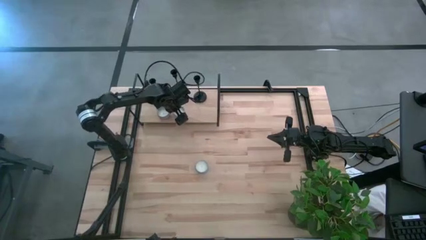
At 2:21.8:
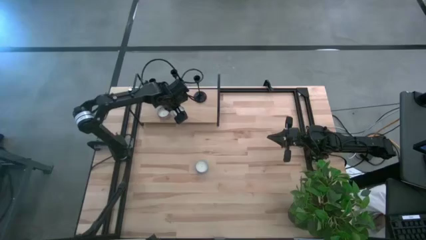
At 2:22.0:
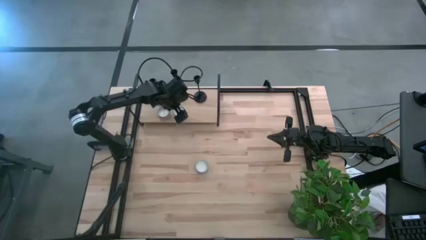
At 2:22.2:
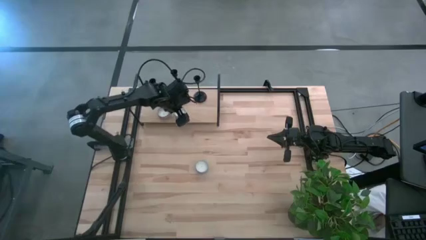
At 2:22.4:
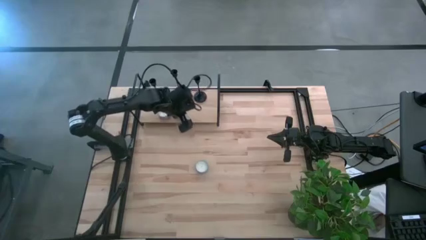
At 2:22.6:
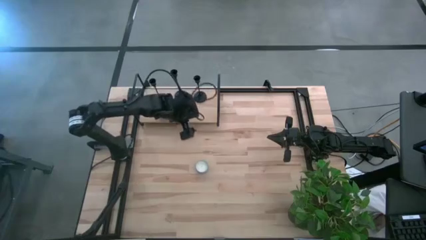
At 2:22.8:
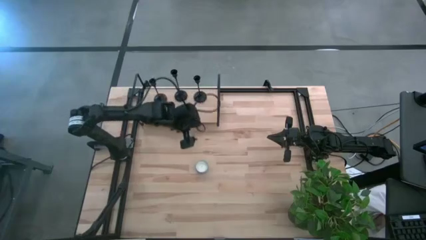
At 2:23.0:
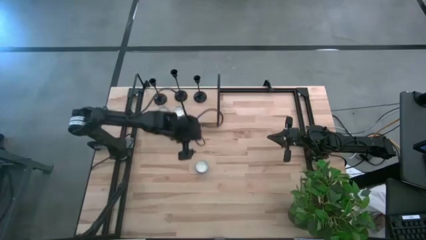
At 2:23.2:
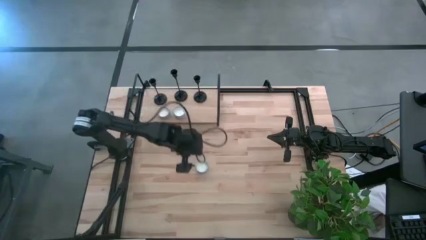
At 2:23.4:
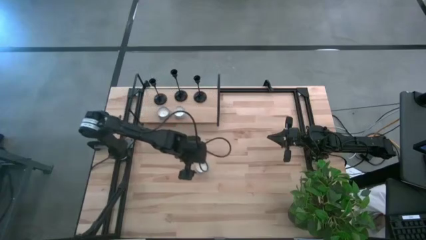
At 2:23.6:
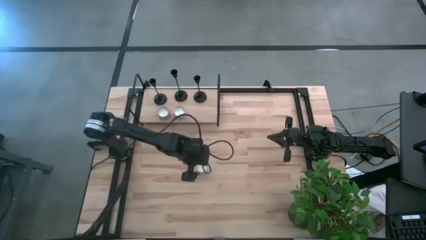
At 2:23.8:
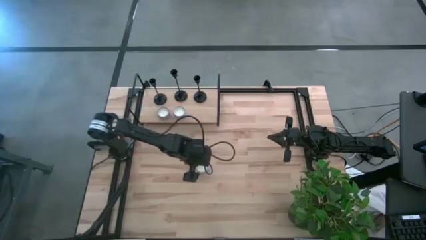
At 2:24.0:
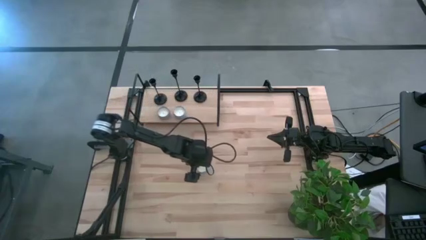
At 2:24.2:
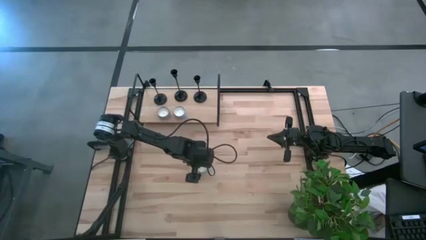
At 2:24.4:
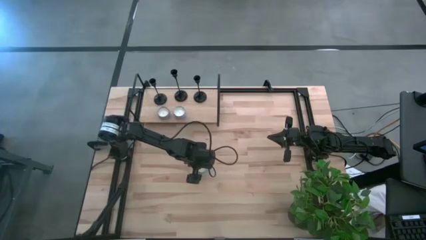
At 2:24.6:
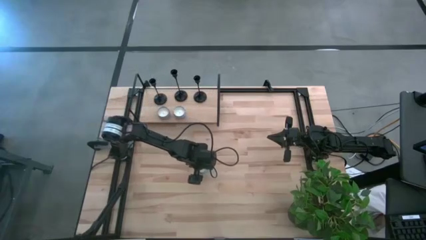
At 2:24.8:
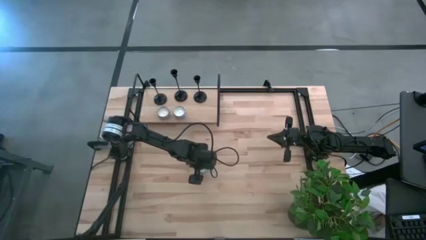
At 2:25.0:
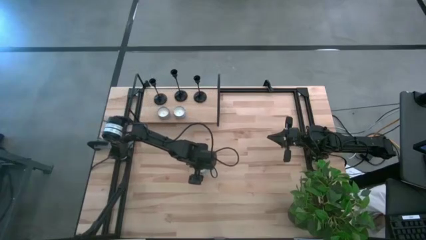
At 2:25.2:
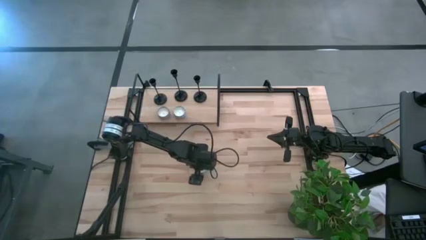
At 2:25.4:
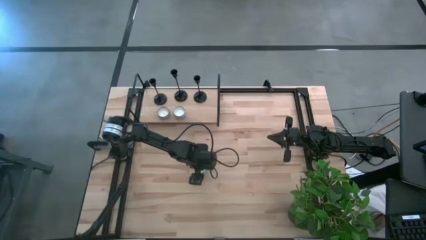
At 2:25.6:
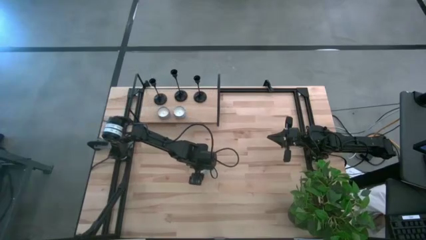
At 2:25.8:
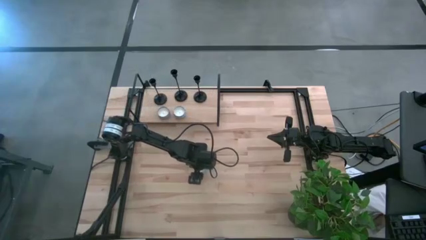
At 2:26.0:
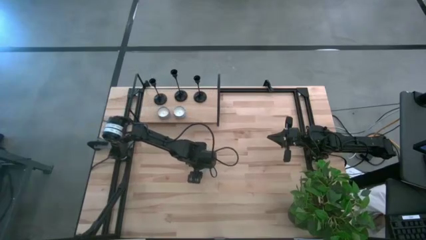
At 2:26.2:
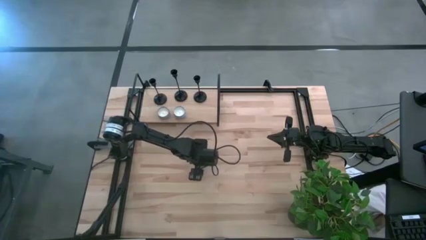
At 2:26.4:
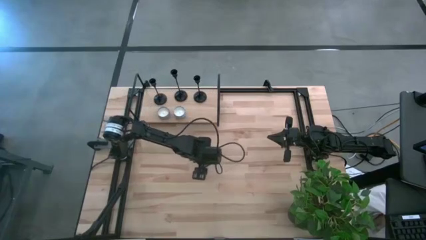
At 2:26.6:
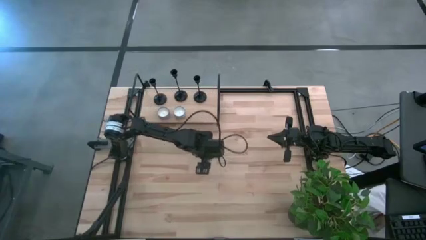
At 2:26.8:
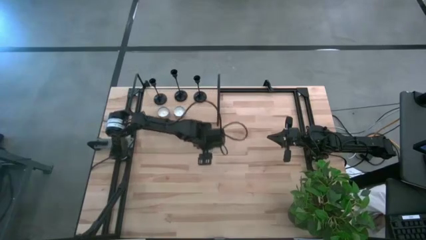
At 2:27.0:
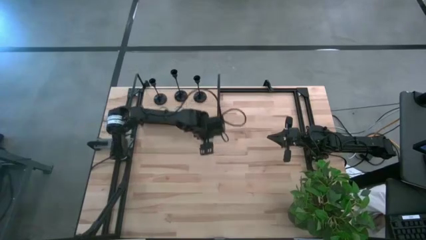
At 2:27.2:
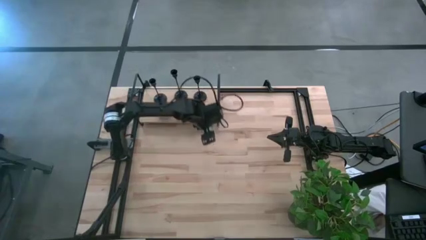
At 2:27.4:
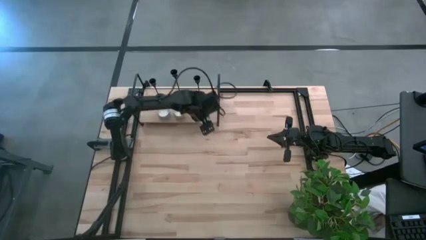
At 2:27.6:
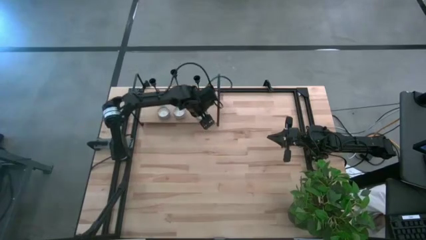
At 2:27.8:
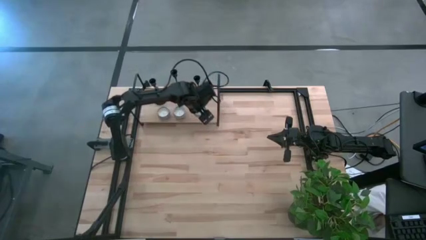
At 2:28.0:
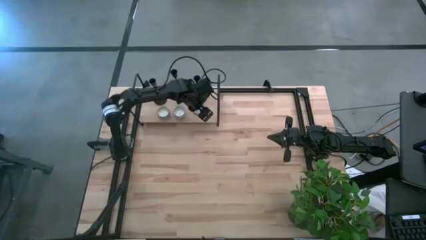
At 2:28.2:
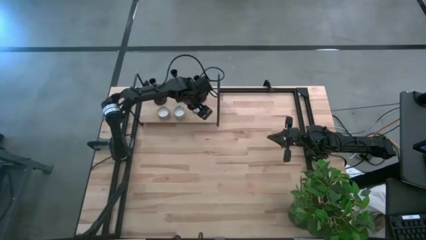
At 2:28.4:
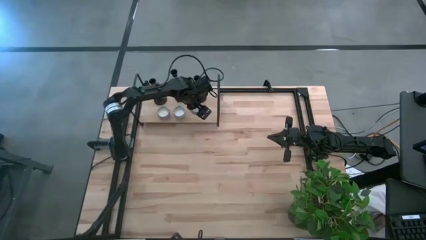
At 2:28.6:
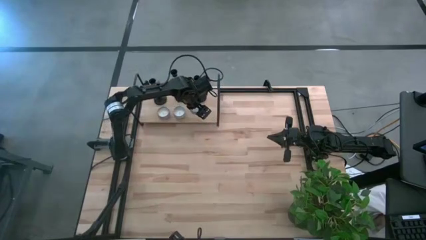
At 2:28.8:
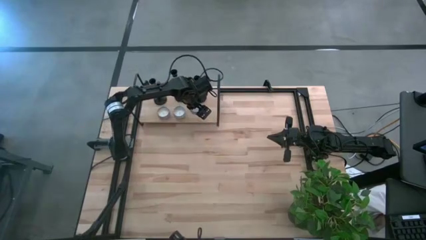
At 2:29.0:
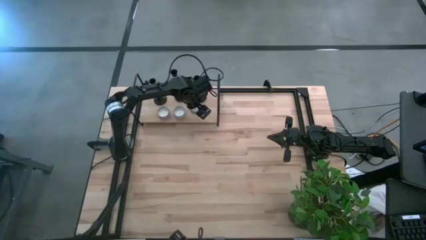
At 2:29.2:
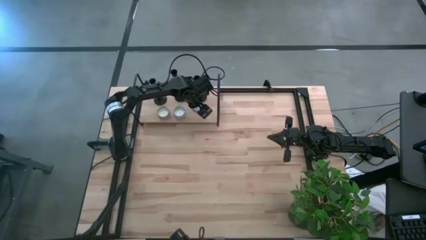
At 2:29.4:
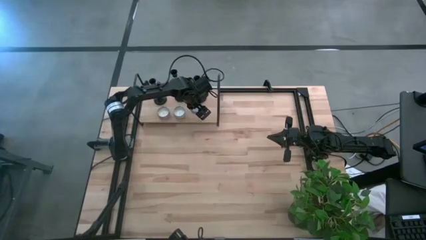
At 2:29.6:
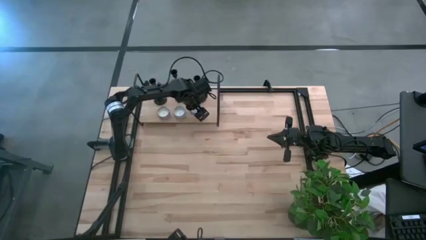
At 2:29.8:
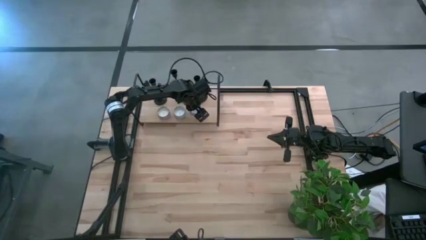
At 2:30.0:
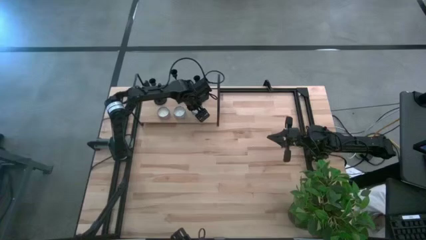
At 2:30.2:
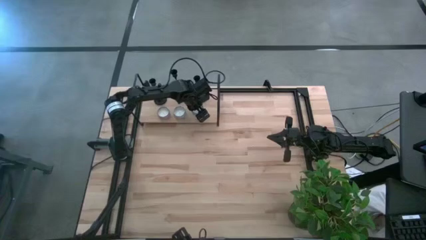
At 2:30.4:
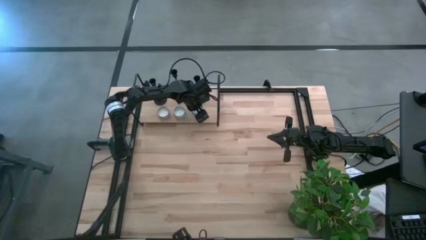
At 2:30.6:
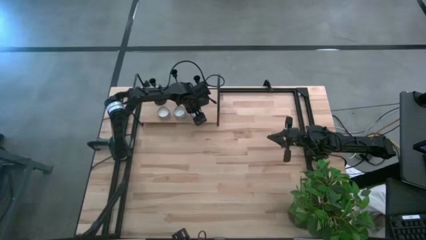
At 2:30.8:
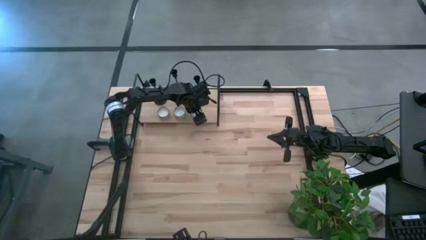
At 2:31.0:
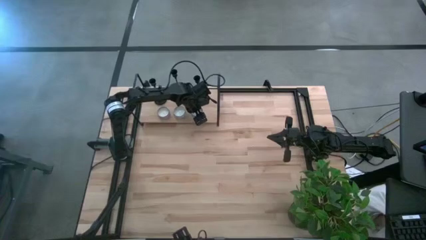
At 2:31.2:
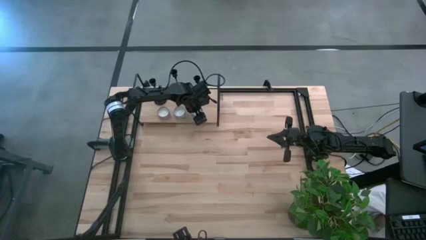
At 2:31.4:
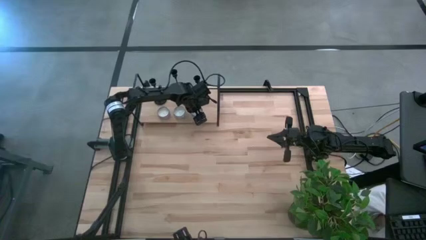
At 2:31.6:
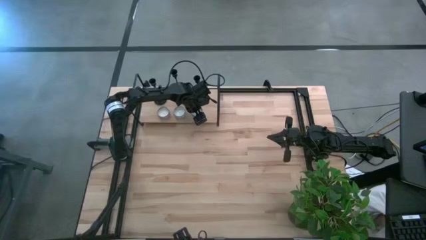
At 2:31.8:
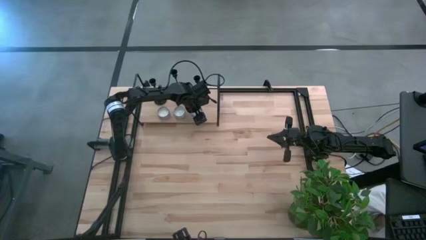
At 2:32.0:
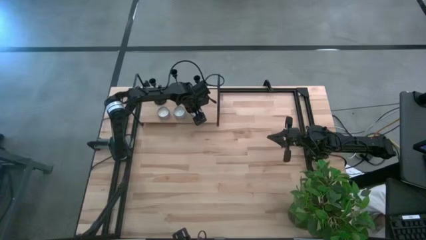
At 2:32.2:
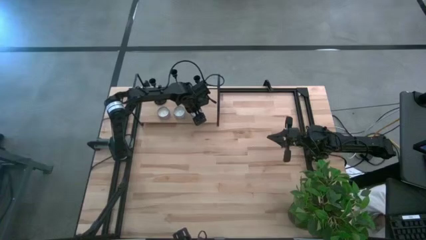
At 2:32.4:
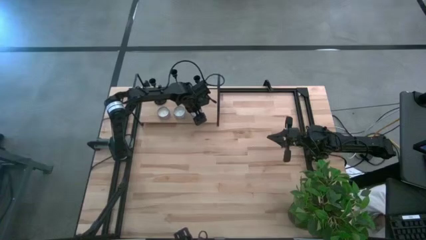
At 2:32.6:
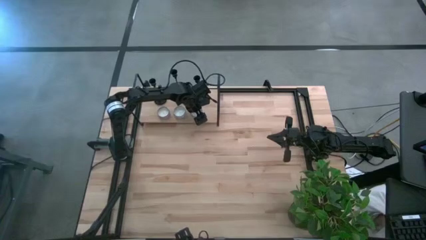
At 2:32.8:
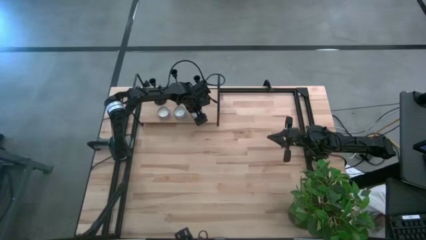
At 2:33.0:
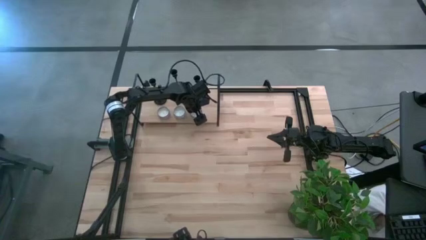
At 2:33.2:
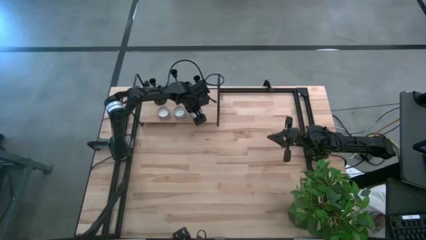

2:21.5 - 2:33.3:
Task: Pick & Place candle stick holders
Align the blue scented candle with the white scented candle on the shelf

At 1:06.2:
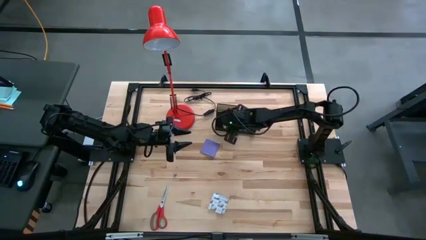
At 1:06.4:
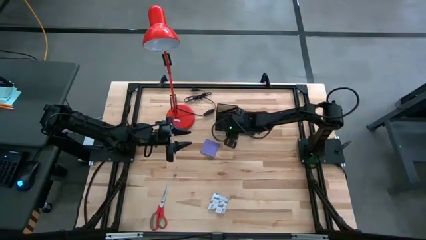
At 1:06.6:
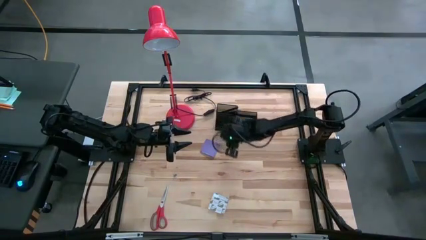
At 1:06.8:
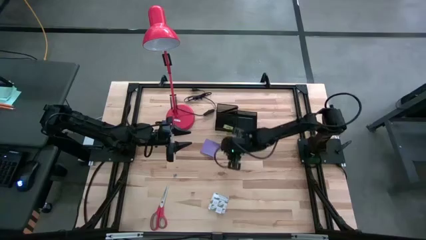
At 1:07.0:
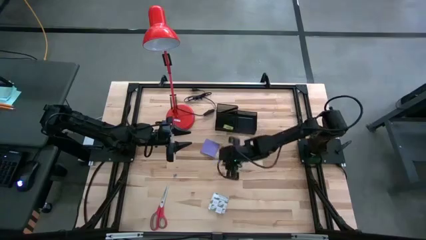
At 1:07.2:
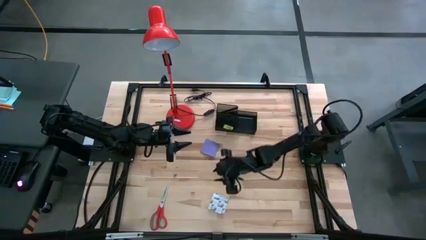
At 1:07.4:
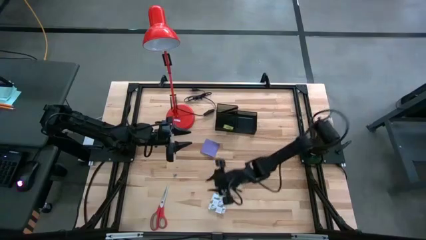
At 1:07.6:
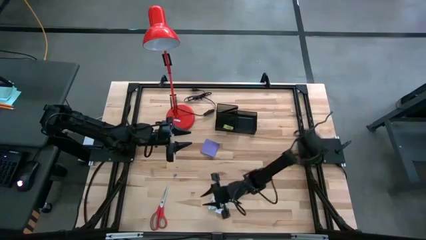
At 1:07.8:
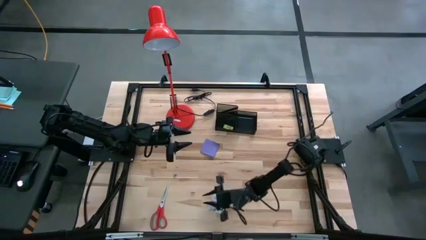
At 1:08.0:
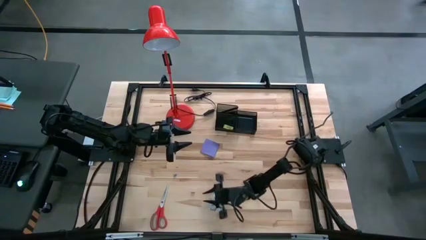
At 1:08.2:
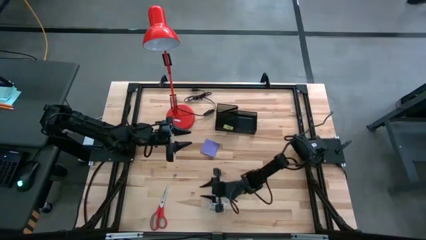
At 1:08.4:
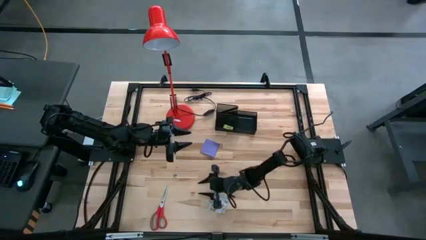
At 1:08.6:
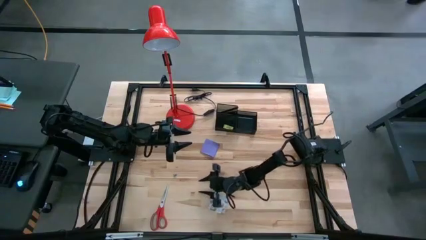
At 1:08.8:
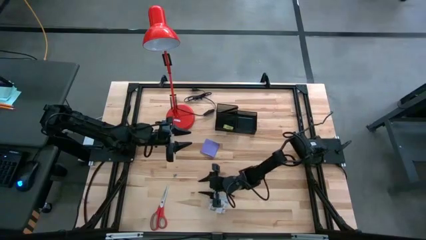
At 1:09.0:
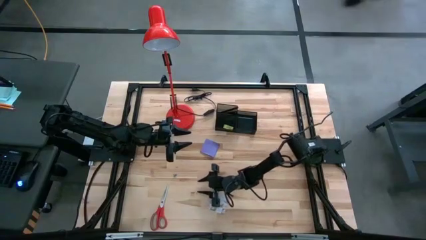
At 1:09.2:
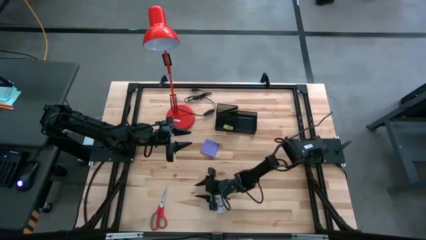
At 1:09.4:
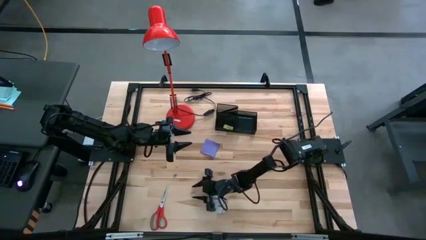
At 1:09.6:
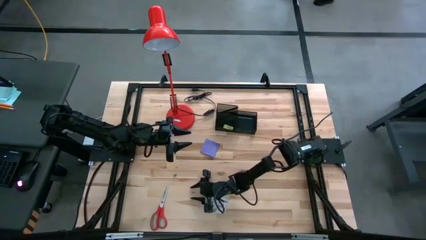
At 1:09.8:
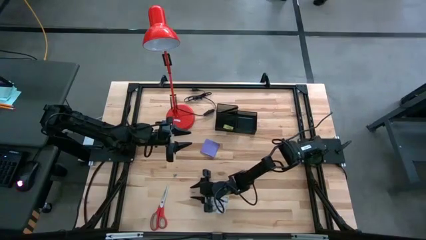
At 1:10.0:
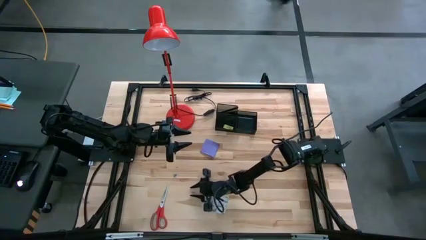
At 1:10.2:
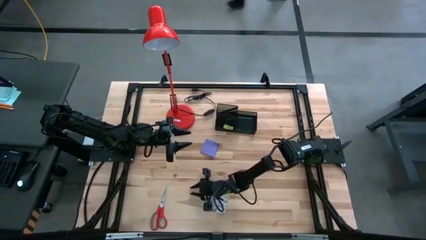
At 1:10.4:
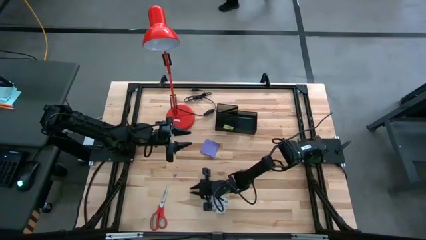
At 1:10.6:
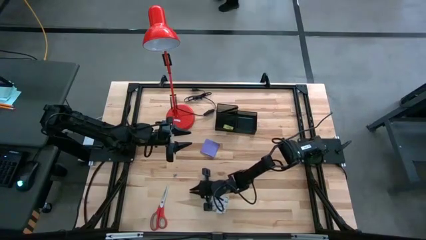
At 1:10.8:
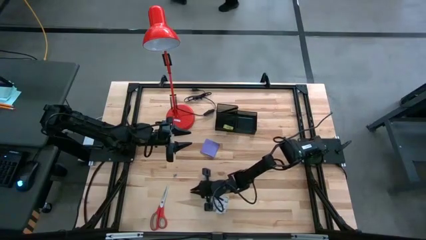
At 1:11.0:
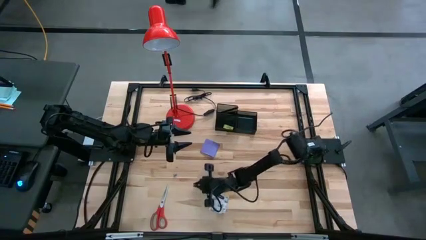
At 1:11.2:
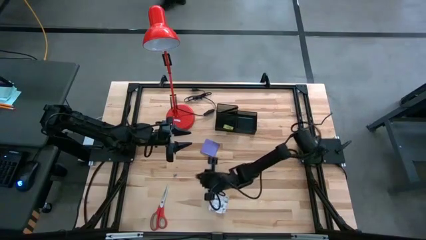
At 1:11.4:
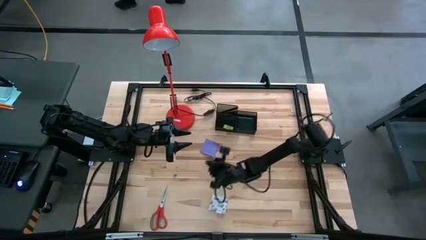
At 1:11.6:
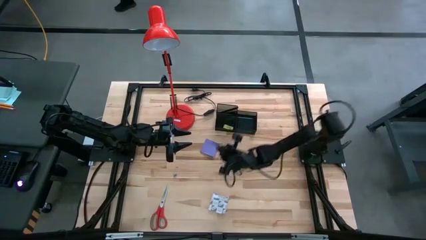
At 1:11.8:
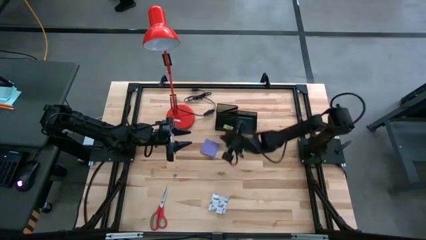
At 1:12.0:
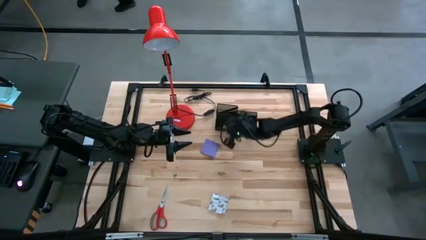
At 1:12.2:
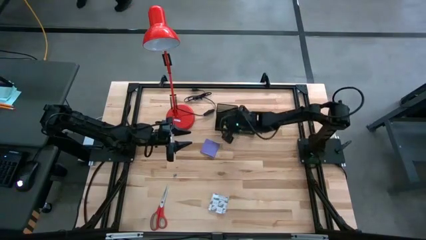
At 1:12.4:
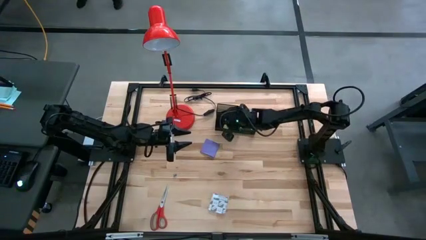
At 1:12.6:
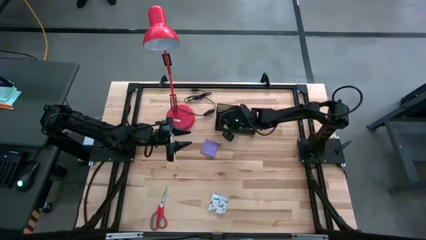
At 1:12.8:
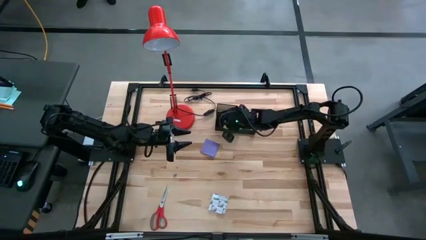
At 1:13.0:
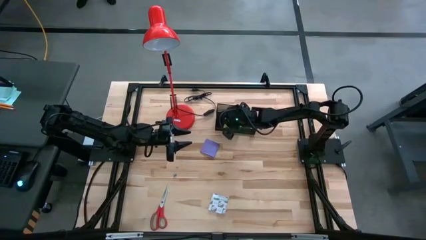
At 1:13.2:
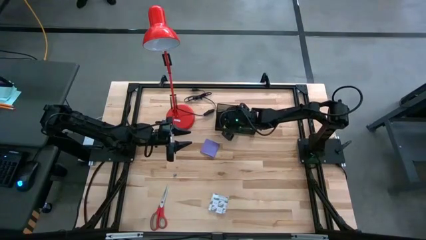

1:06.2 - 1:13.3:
Task: Pick and place office supplies into organizer
Put the pink binder clip into the black desk organizer
